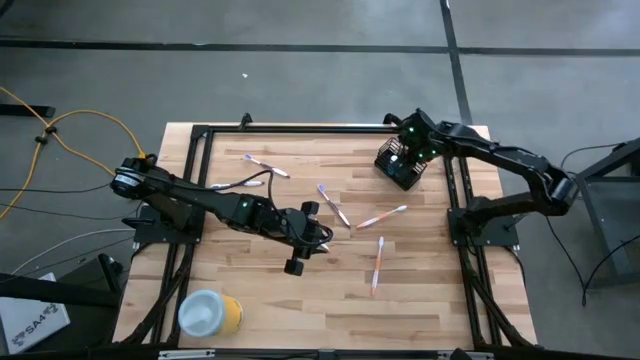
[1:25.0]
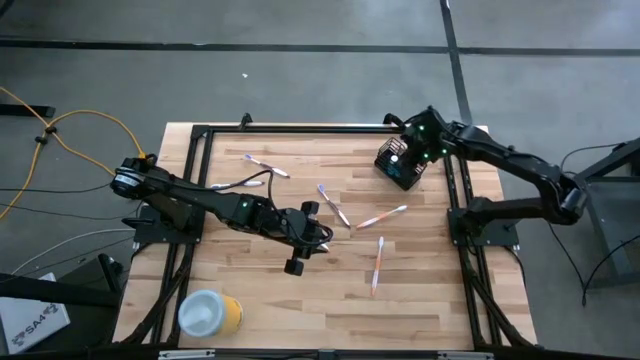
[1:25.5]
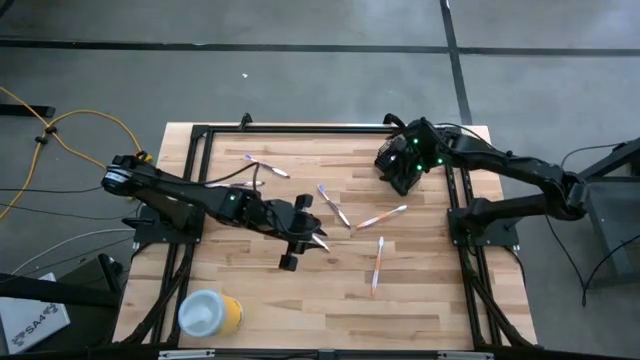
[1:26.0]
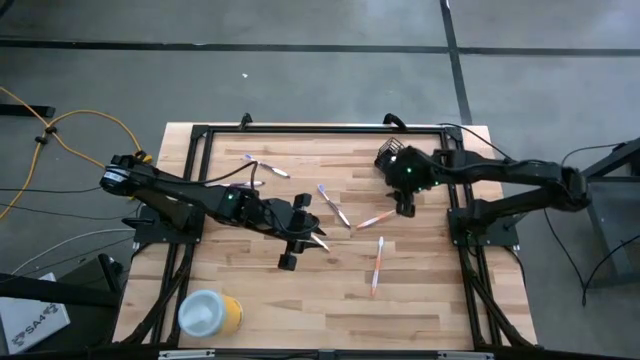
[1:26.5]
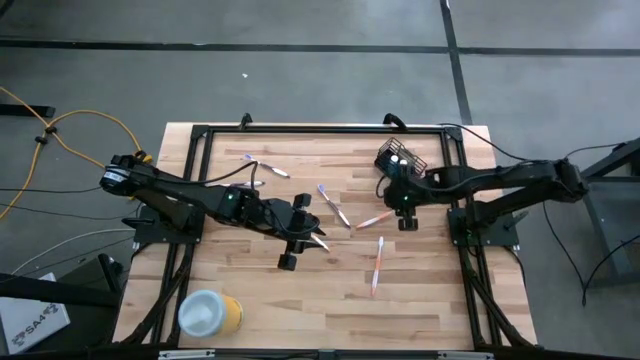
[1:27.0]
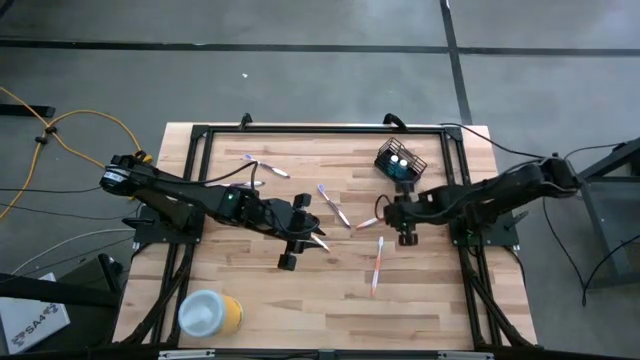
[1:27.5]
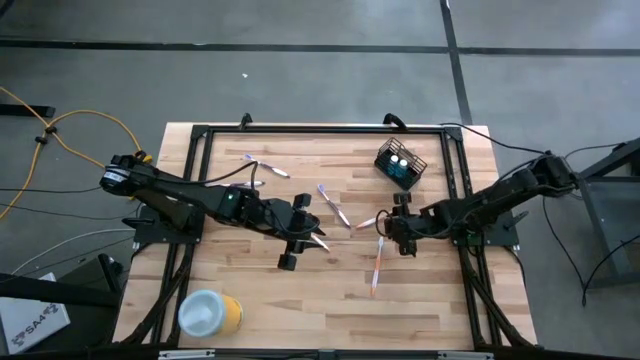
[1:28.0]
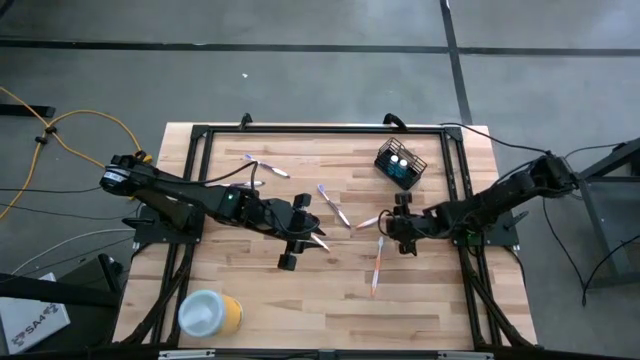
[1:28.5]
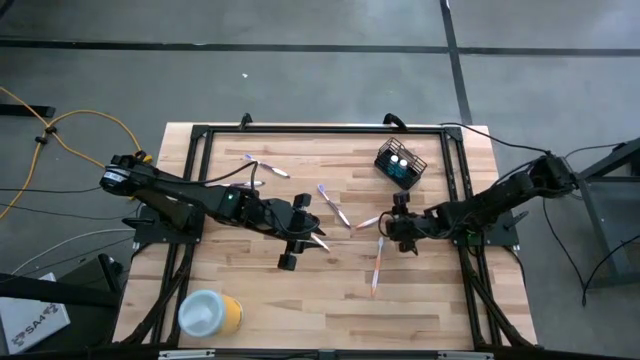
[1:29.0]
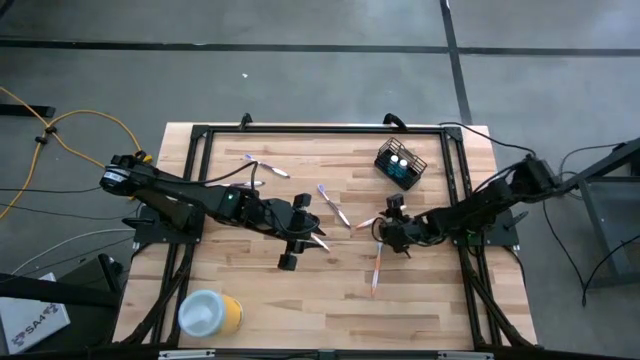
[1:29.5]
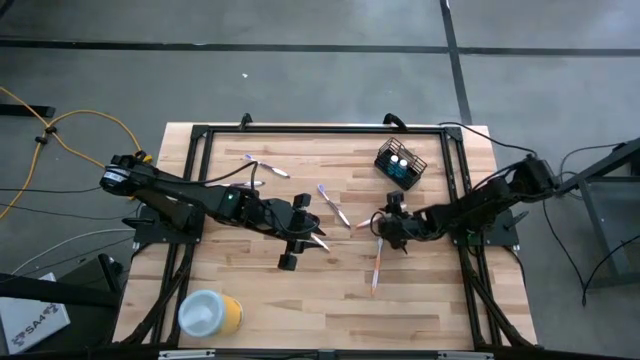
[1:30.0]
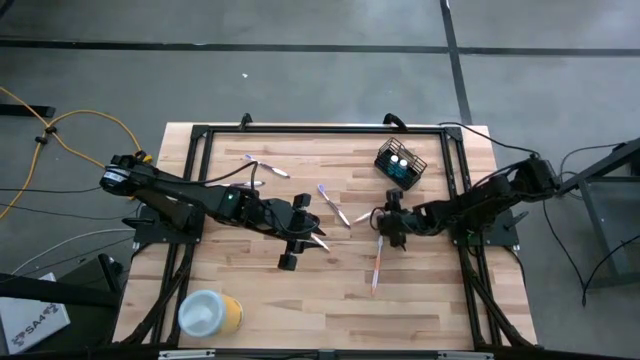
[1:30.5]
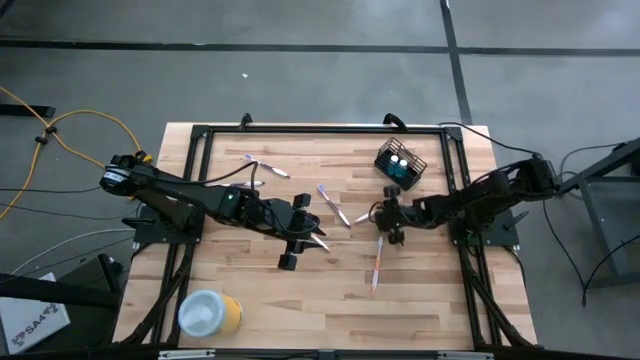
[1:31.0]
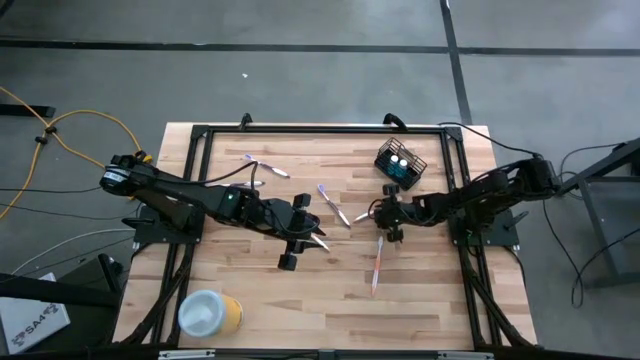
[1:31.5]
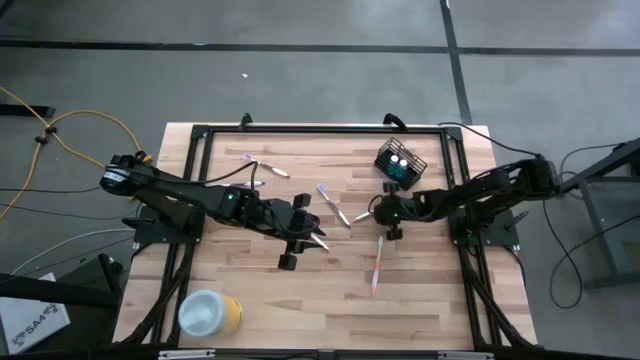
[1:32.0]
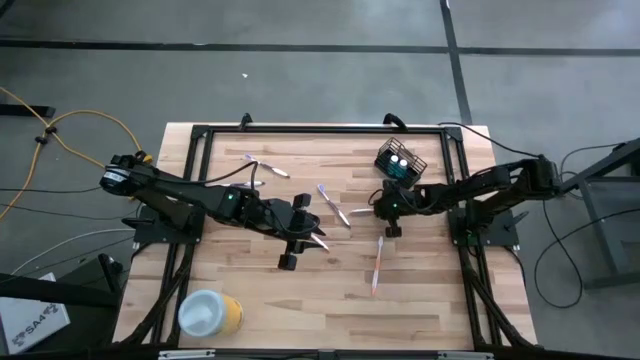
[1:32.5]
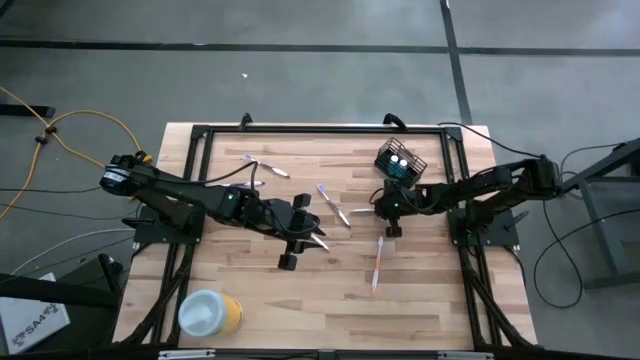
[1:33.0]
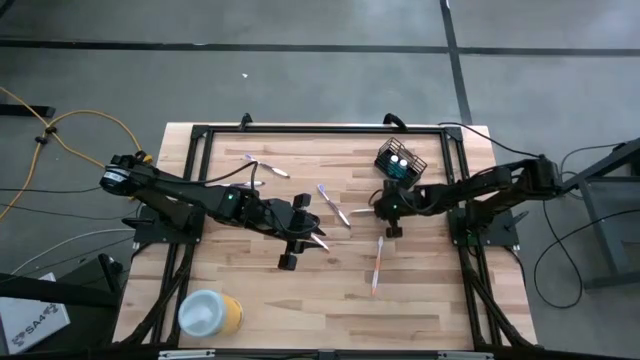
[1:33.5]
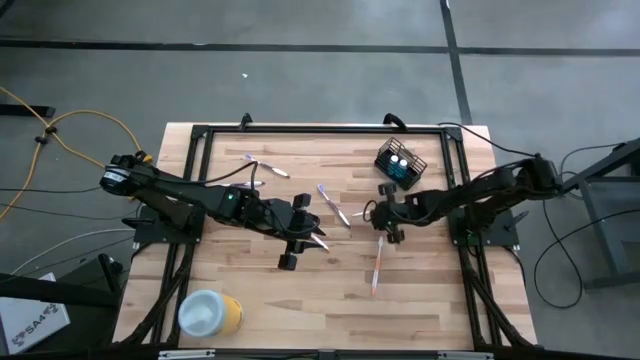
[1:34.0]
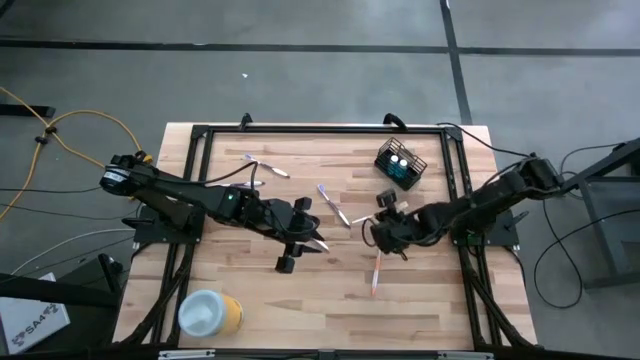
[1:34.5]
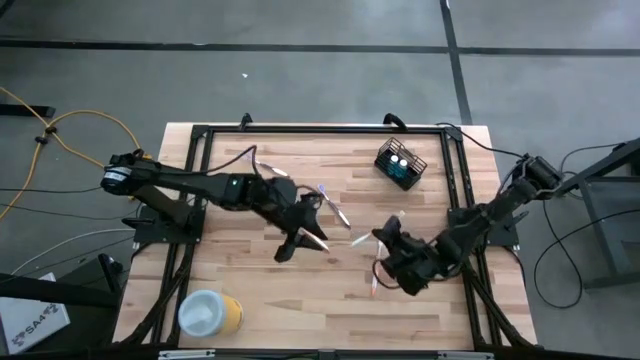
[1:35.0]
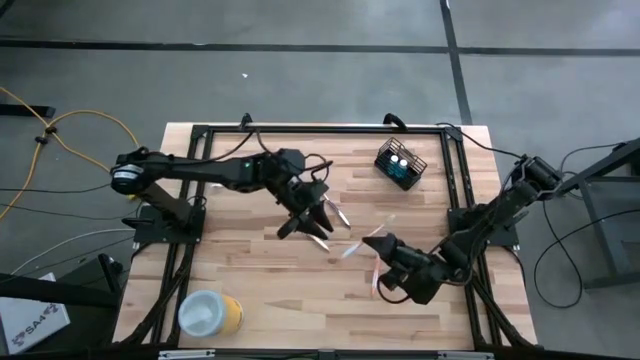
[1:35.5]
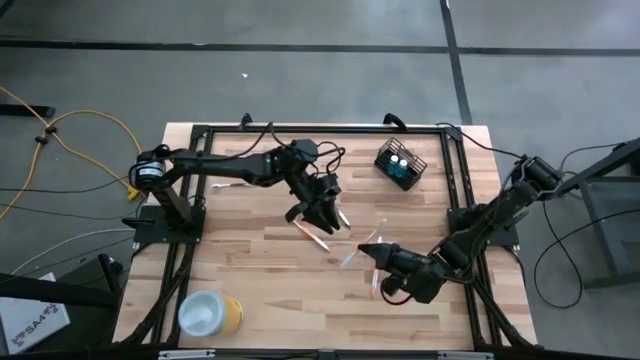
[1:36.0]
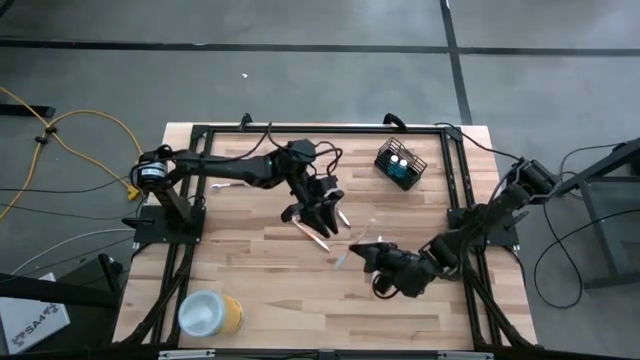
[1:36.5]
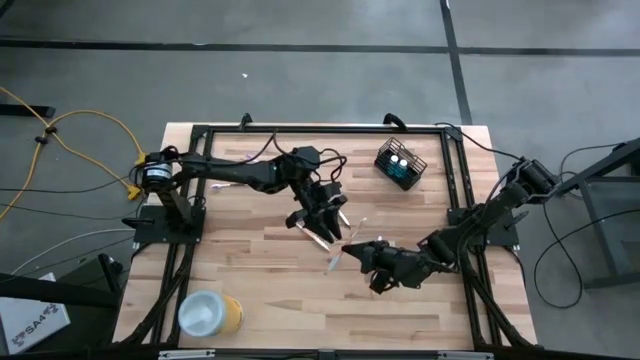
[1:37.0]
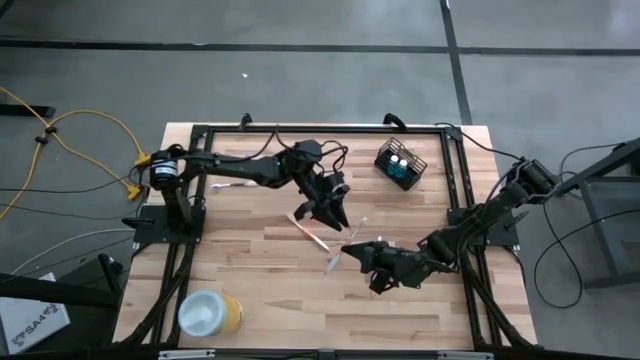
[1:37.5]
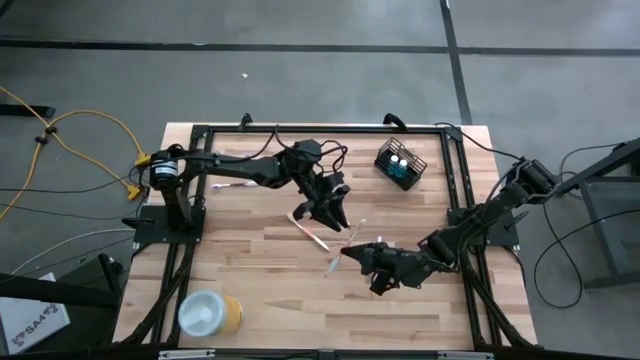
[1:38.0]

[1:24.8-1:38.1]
Task: Pick & Place toothbrushing station
Put the top orange toothbrush into the left of the black mesh organizer
